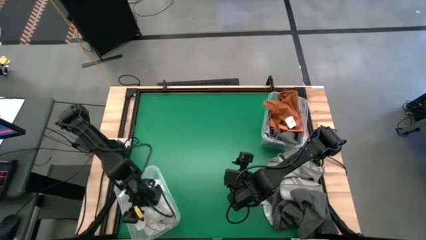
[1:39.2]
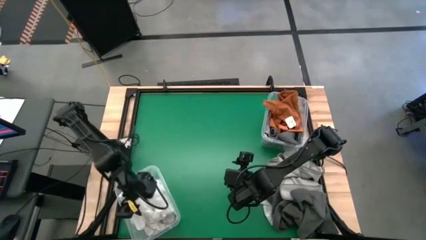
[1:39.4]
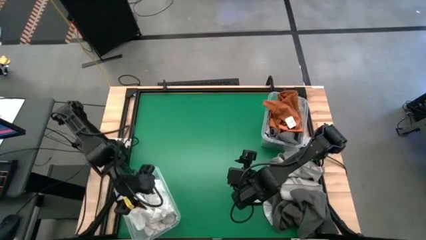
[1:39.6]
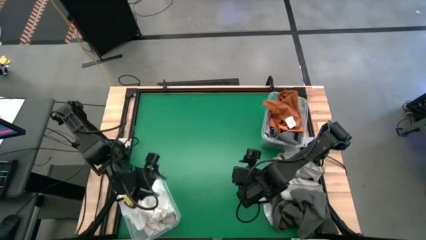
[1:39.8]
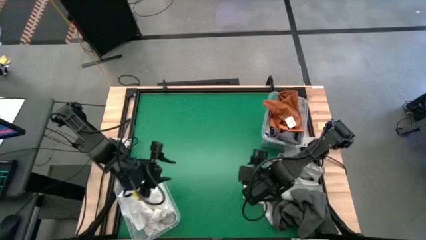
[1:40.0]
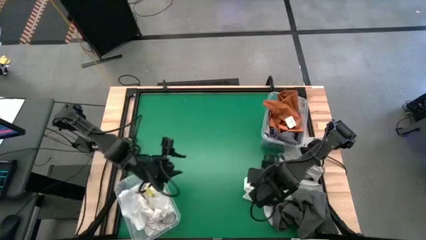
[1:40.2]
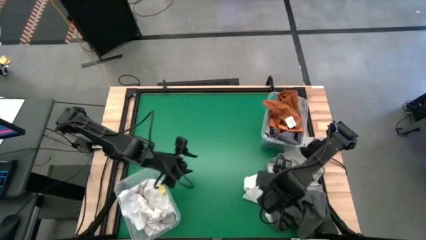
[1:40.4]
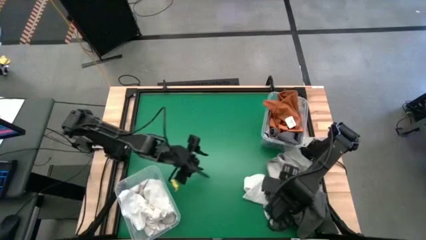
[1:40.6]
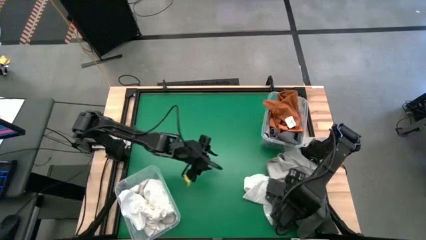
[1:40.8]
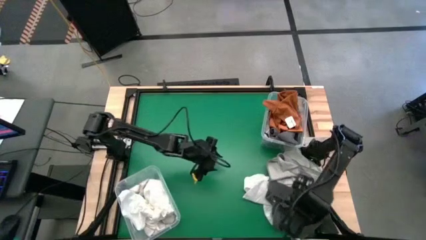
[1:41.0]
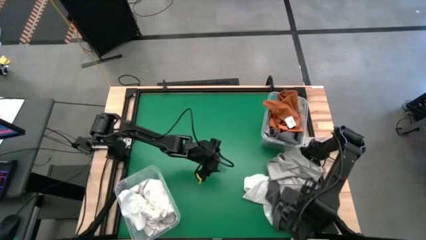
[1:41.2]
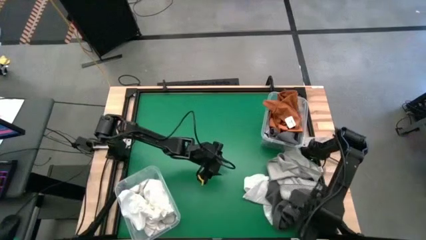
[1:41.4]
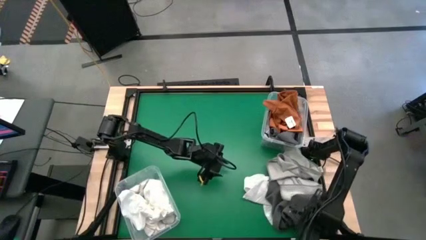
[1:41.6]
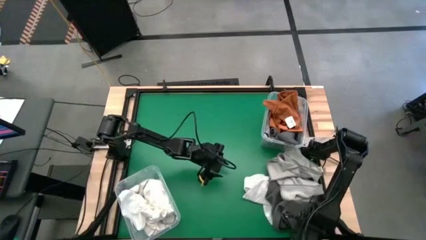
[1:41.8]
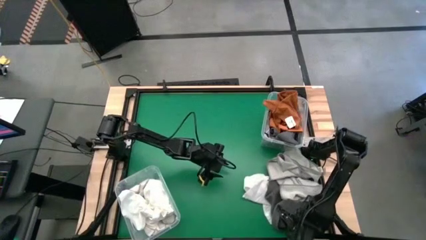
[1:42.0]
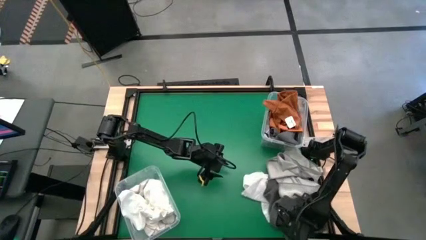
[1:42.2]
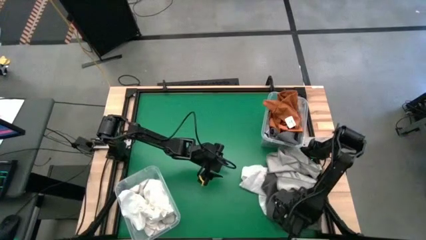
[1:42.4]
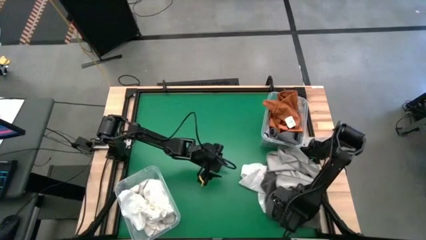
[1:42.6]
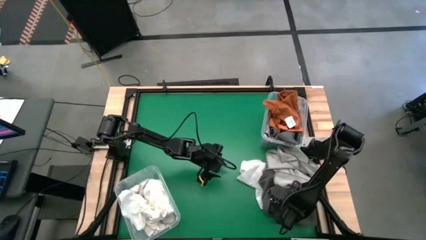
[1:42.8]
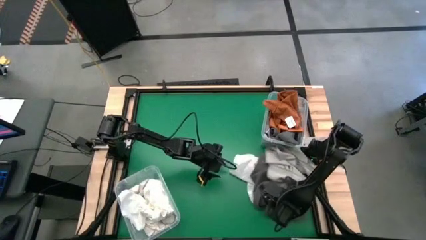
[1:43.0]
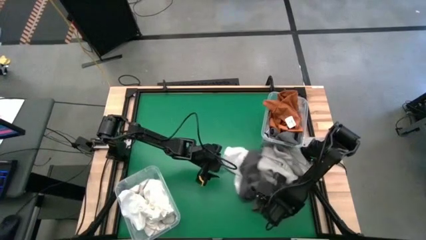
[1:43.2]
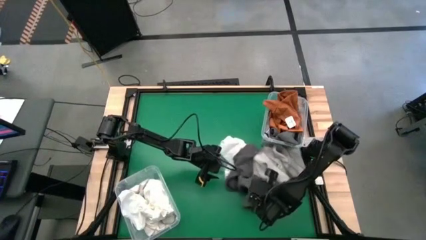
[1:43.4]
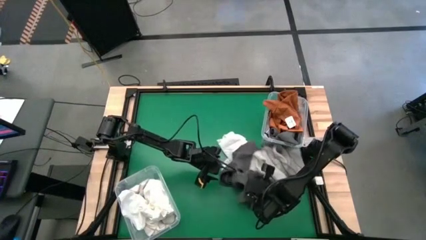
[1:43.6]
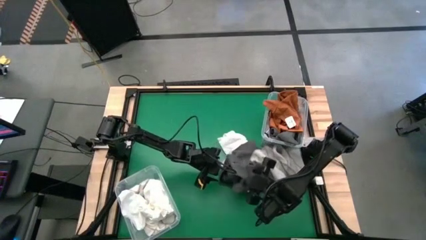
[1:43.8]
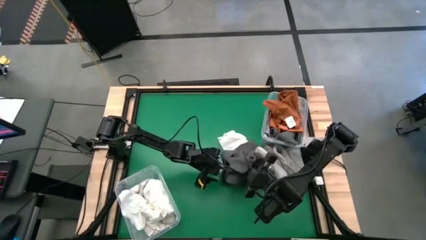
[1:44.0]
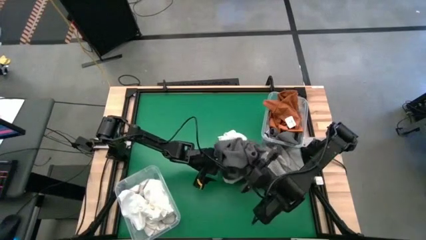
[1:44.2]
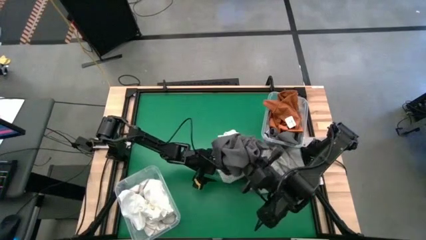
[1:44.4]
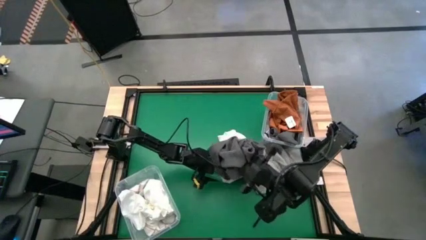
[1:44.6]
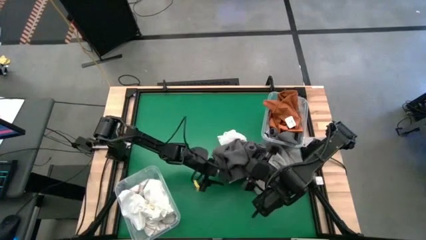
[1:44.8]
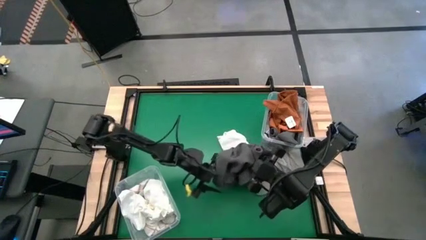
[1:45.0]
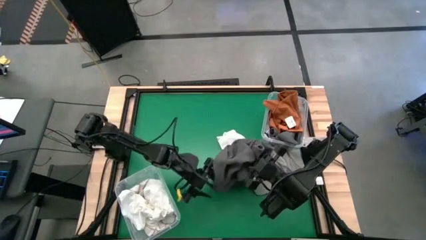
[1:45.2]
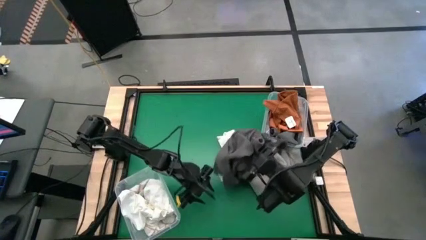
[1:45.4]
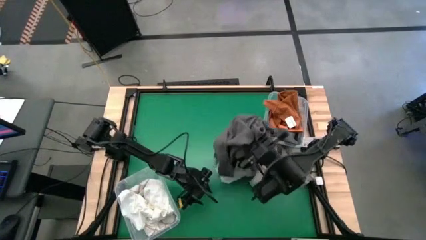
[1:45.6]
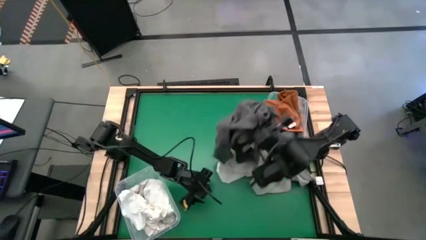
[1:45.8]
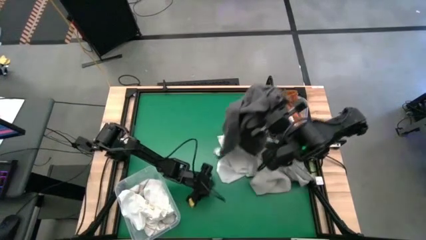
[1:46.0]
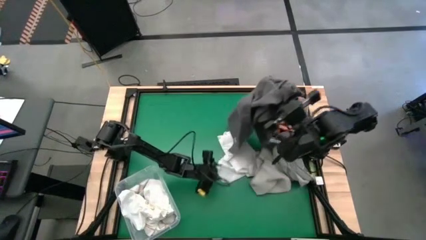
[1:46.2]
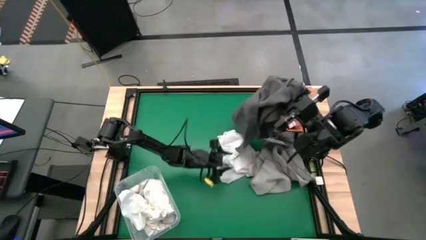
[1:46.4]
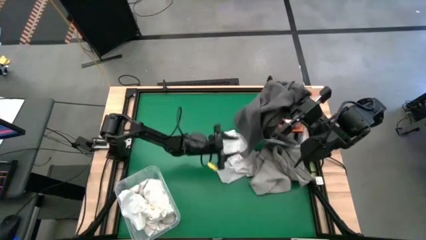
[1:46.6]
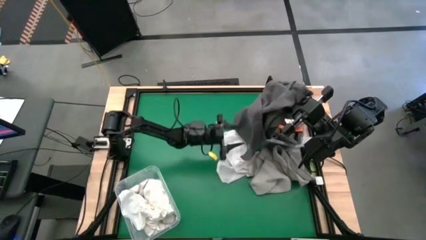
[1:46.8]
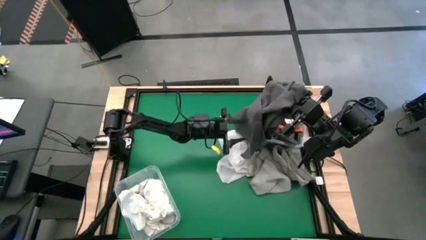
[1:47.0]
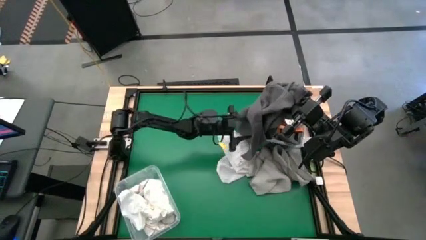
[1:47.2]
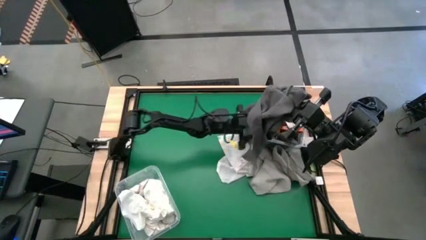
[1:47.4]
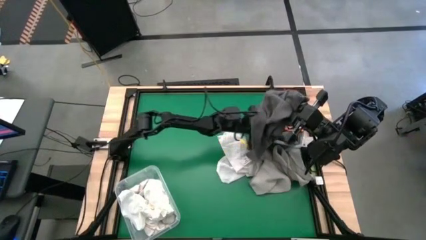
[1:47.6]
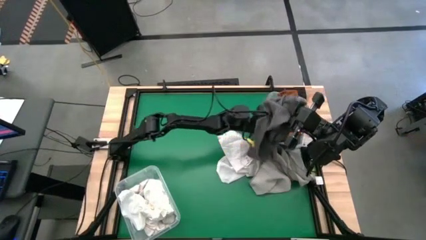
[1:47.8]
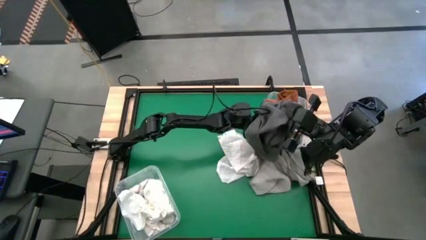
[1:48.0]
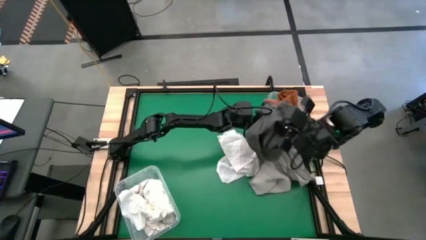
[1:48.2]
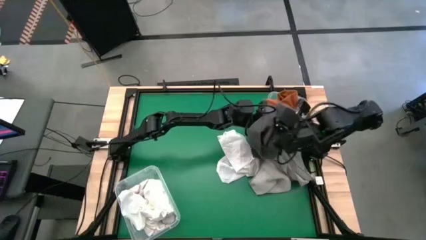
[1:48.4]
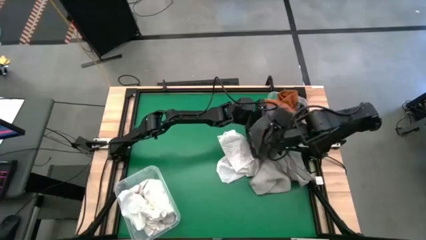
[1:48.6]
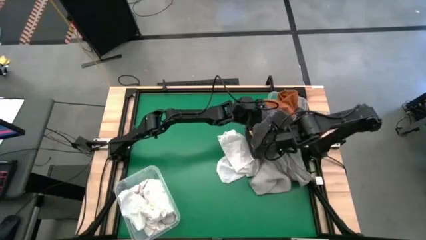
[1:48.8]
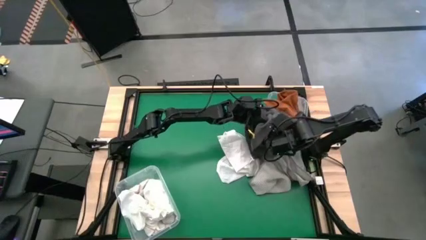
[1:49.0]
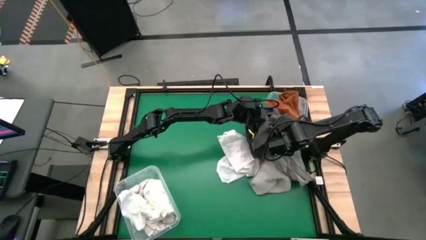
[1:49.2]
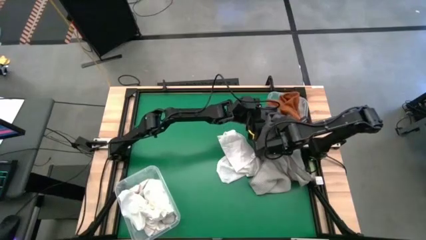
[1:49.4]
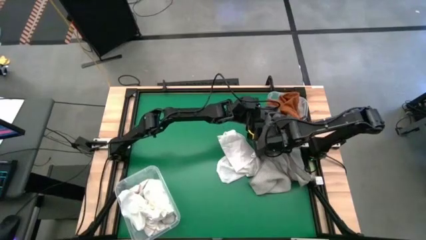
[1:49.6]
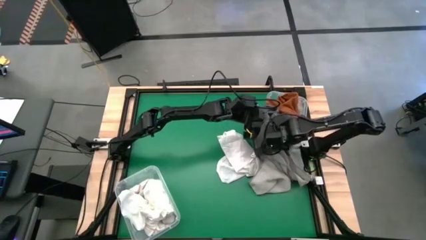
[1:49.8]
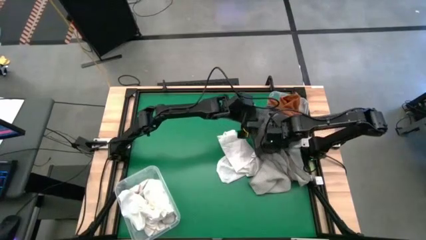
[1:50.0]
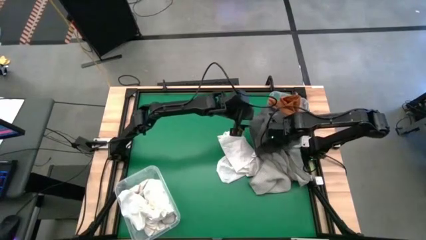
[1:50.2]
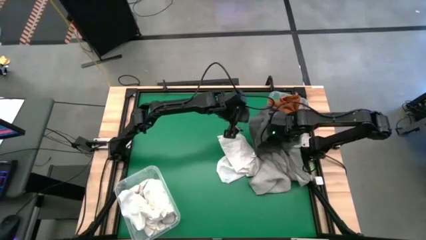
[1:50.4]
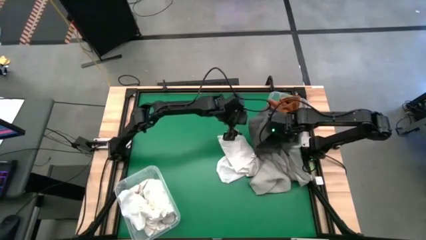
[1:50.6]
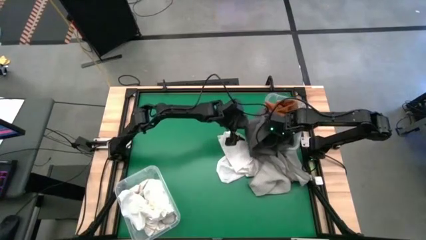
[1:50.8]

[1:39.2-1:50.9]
Task: Sort towels by color in basket
Put the gray microfiber towel into the top transparent bin
